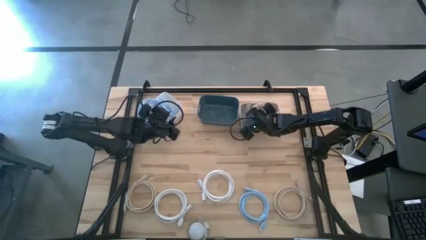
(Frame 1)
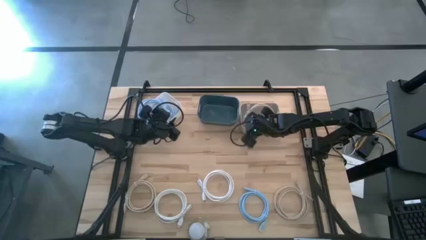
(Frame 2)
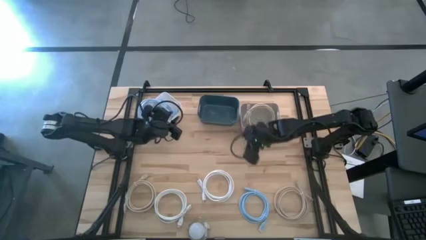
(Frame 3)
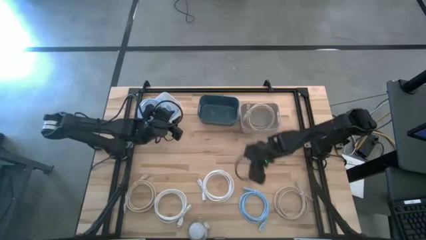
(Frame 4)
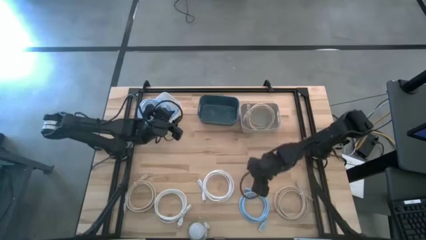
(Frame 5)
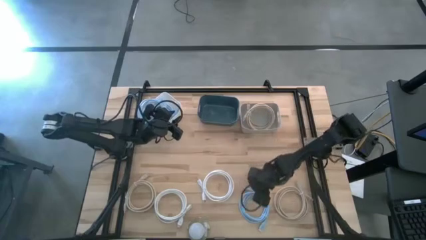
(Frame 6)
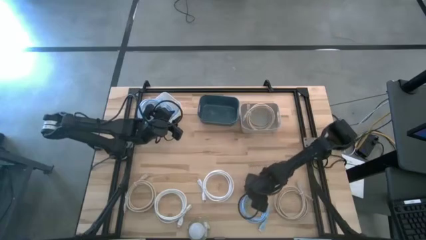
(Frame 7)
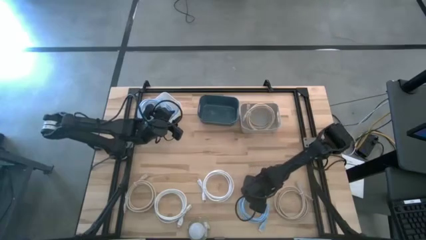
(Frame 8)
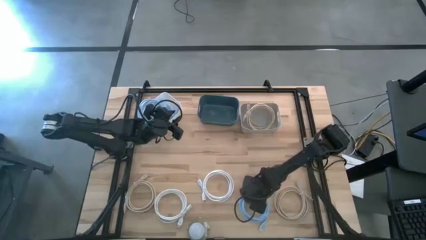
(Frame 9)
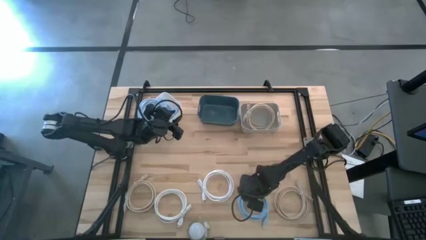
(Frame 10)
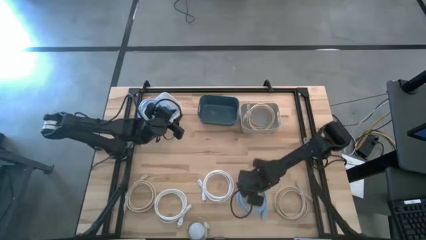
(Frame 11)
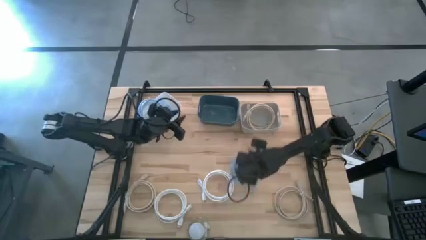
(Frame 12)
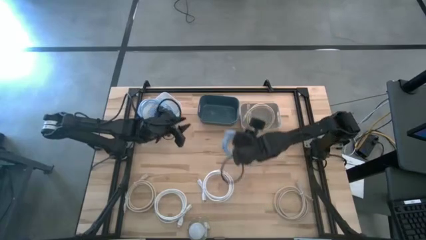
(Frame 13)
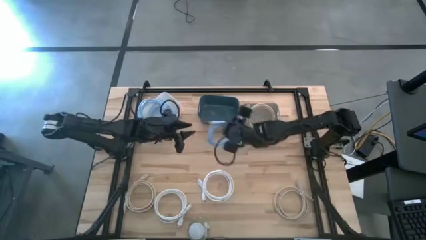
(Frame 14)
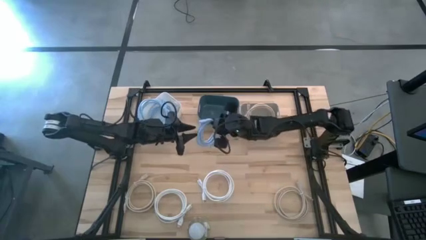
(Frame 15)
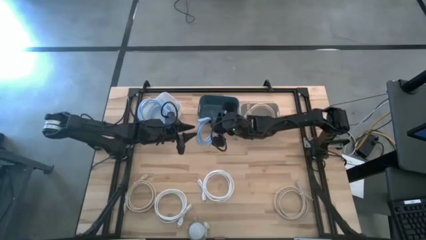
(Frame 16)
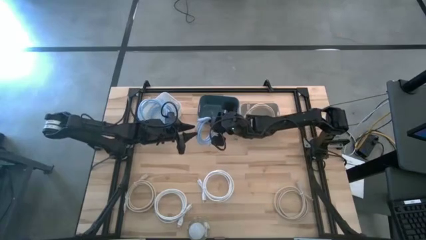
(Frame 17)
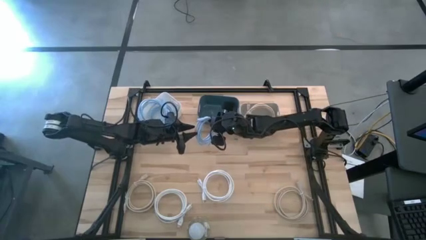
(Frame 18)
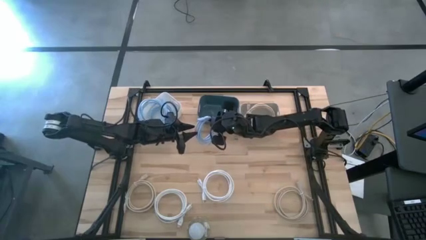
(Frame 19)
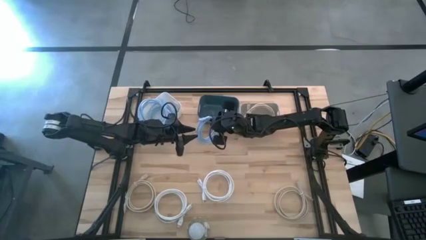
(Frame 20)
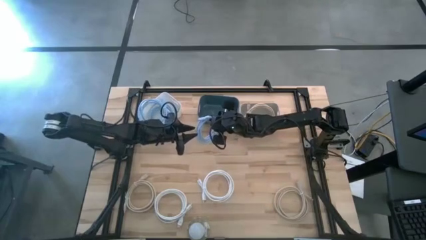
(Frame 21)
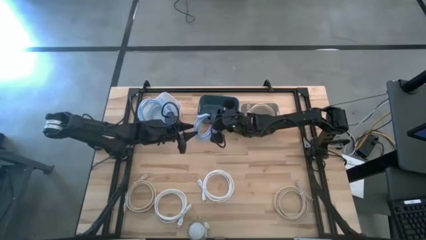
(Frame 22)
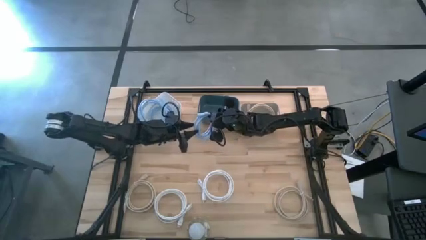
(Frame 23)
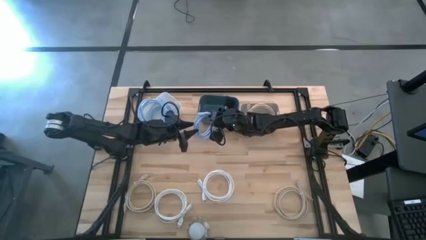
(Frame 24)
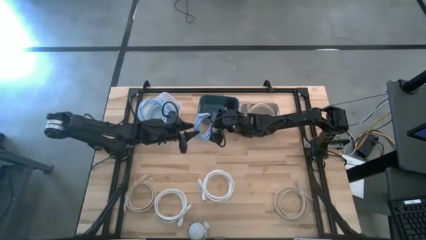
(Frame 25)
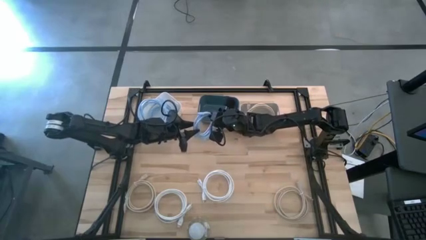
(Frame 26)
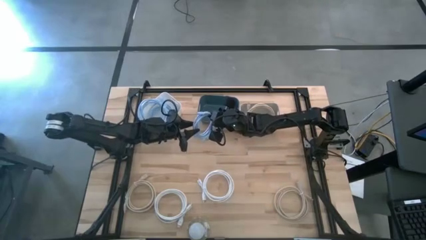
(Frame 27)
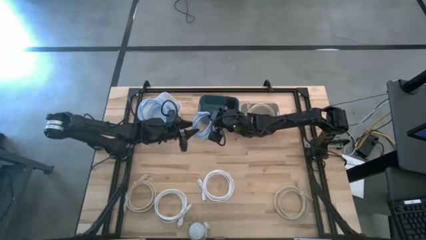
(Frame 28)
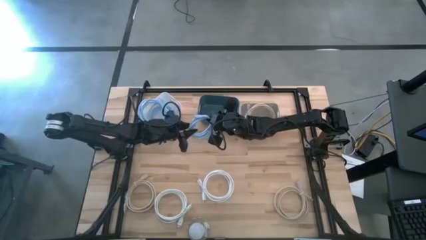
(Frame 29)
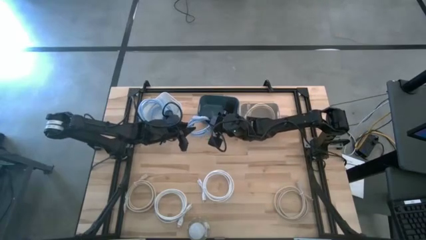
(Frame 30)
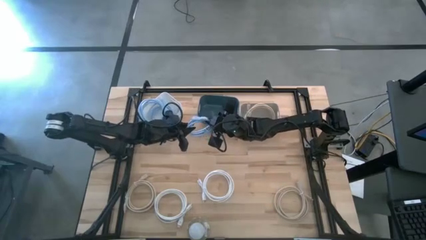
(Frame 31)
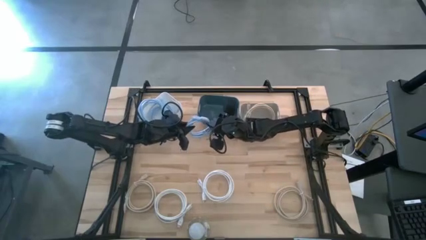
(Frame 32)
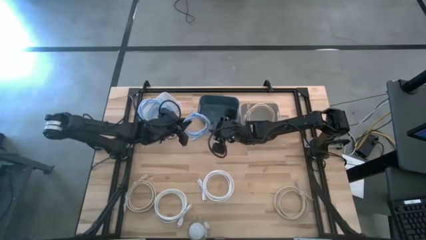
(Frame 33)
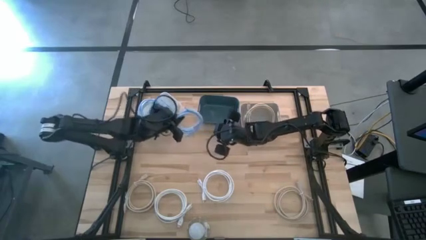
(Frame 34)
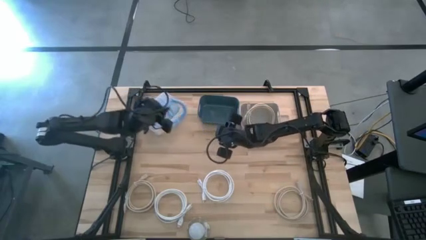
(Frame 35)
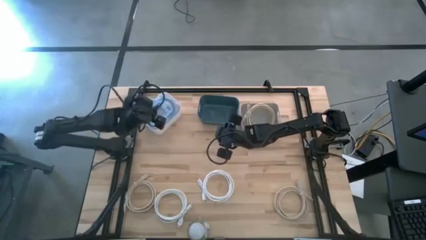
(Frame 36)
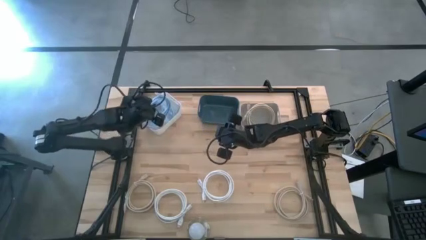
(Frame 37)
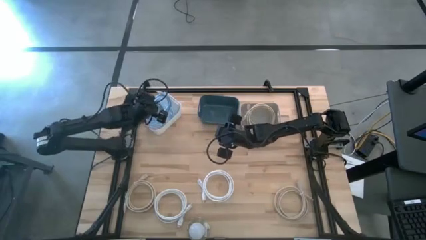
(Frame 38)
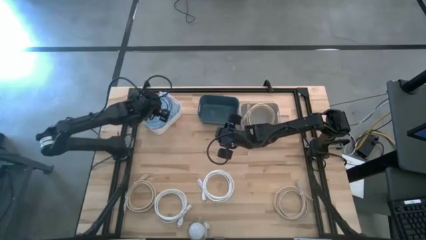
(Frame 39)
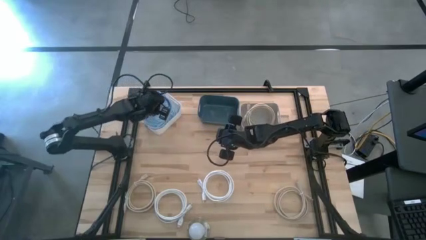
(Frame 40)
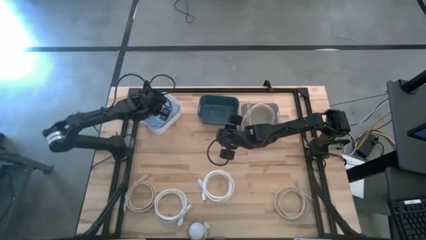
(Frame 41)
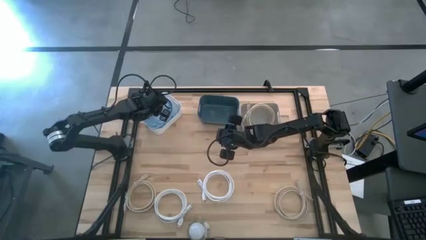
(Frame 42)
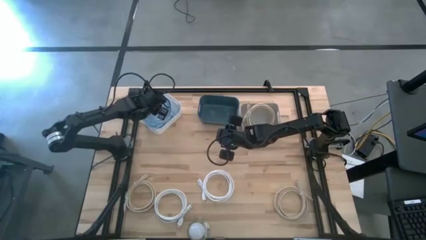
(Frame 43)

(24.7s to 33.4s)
Task: Pick & Place USB Port
Put the blue charger cable into the white bin

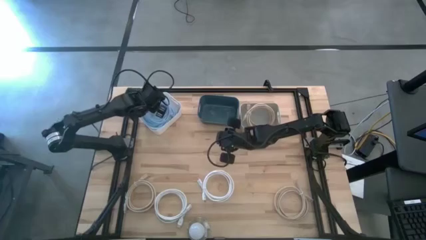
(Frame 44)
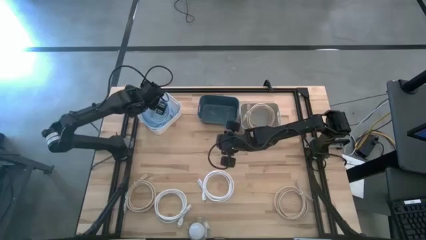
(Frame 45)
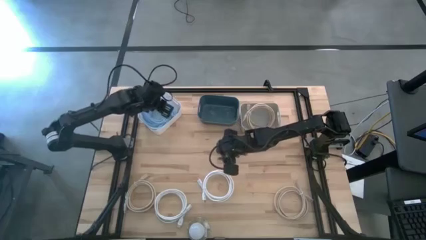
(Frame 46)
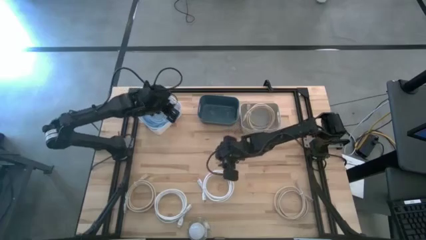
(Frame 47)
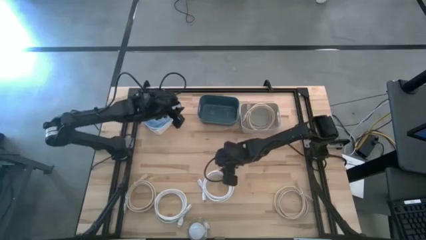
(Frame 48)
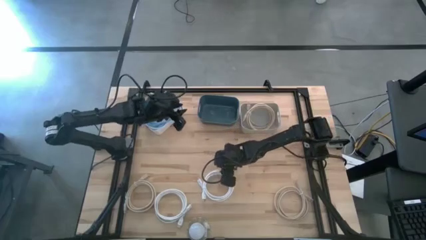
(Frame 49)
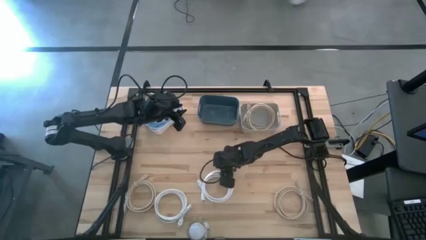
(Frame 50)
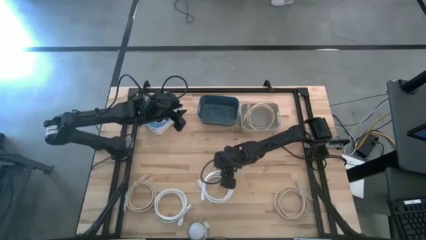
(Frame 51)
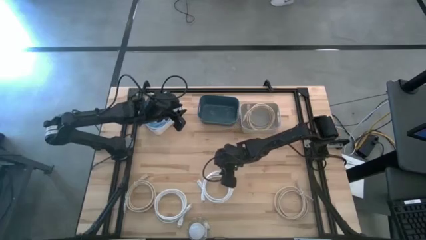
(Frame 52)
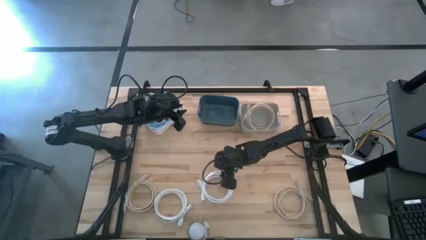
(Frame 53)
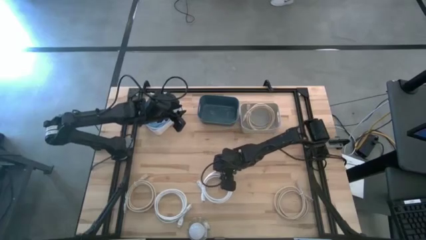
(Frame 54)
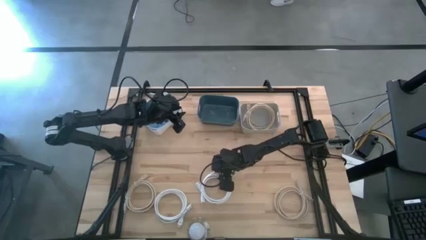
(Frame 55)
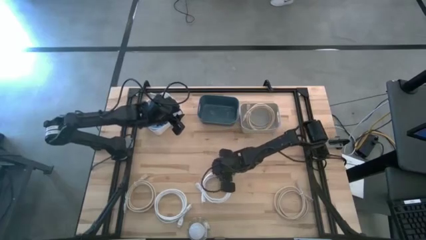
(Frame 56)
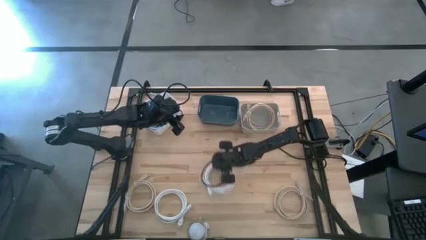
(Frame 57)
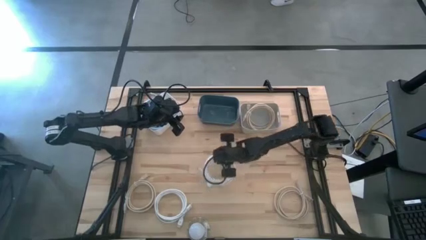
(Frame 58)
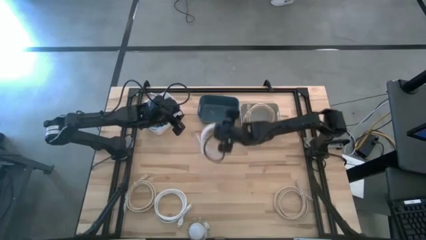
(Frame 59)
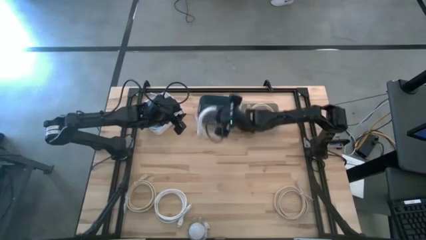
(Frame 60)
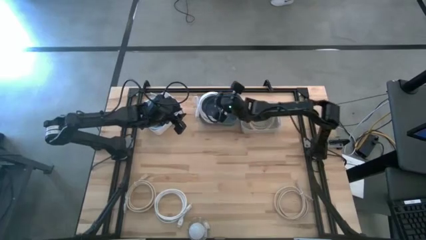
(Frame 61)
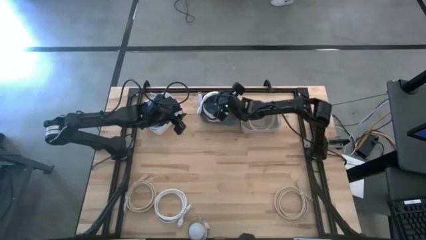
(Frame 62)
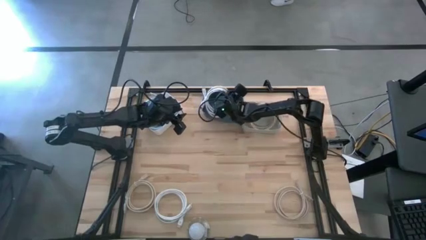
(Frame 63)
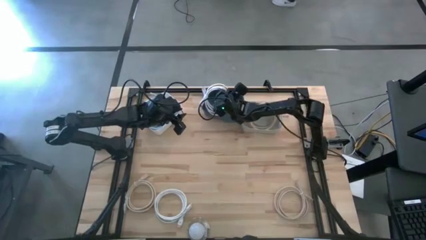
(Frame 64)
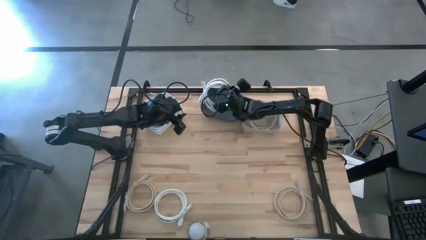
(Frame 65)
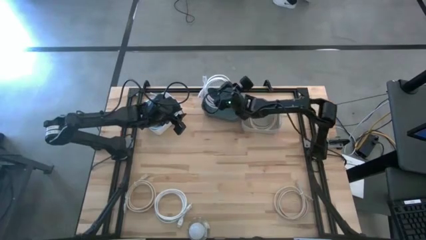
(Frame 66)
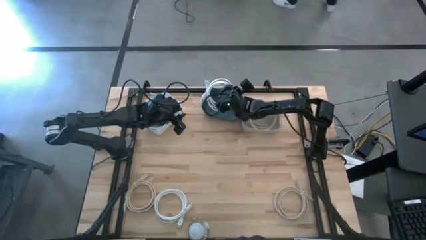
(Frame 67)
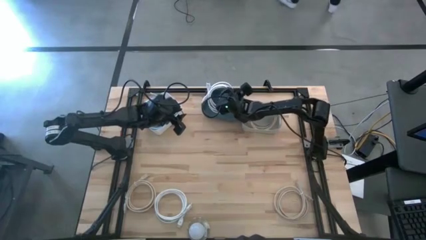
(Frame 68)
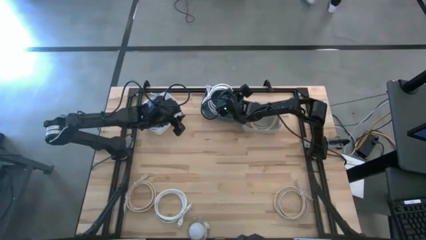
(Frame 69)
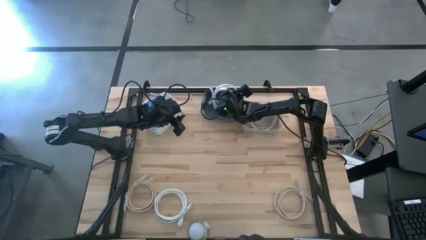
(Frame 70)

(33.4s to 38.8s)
Put the right white charger cable into the blue bin

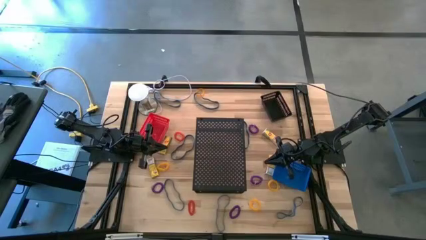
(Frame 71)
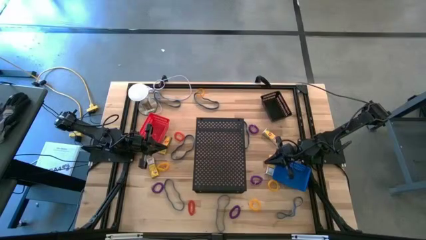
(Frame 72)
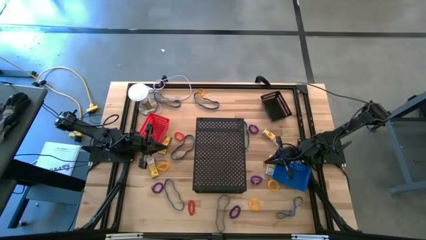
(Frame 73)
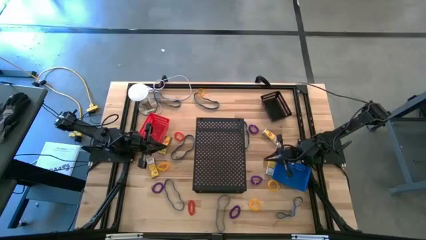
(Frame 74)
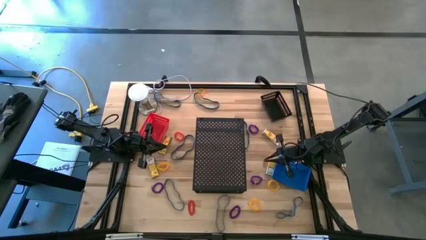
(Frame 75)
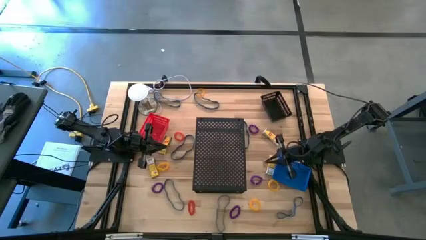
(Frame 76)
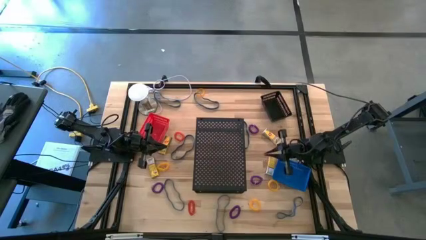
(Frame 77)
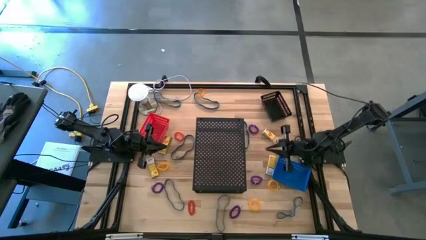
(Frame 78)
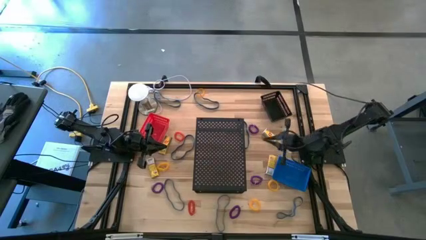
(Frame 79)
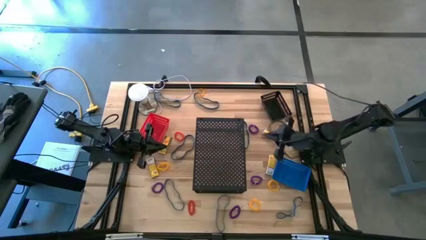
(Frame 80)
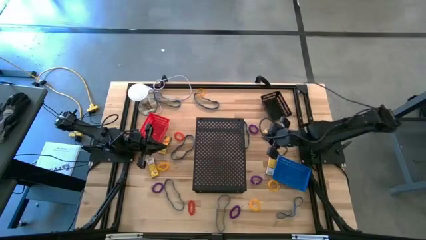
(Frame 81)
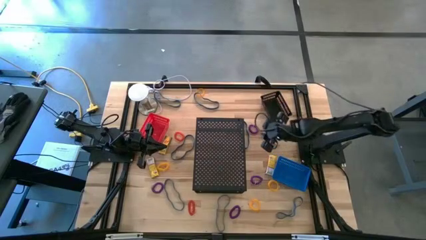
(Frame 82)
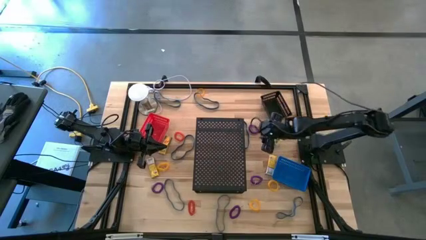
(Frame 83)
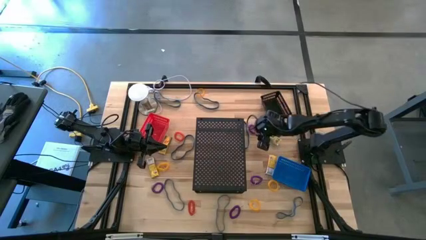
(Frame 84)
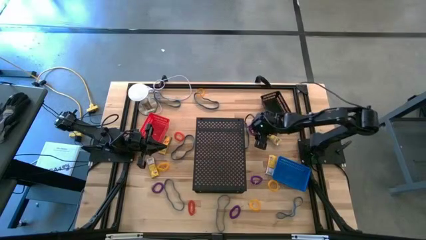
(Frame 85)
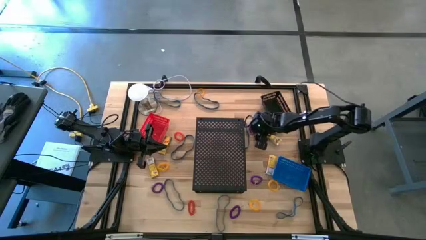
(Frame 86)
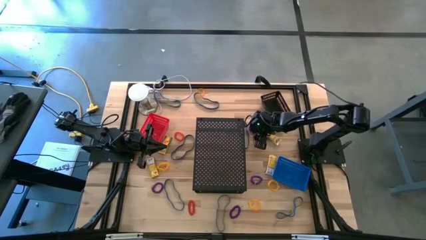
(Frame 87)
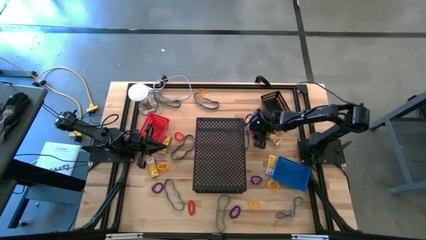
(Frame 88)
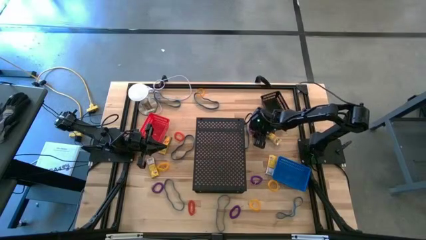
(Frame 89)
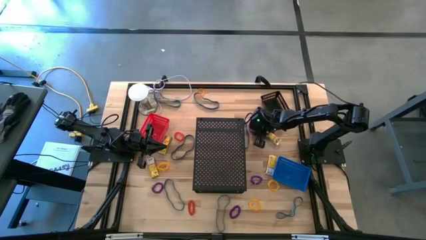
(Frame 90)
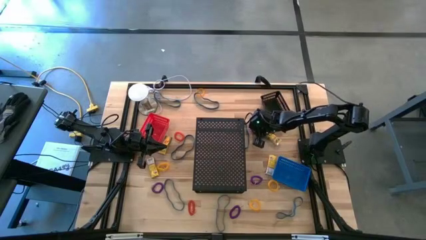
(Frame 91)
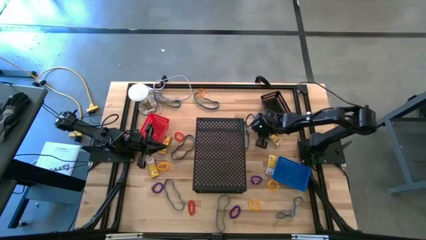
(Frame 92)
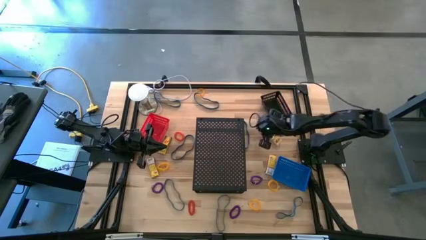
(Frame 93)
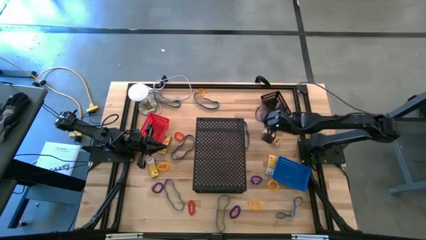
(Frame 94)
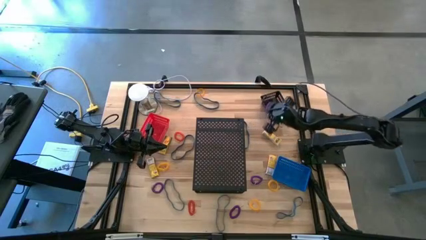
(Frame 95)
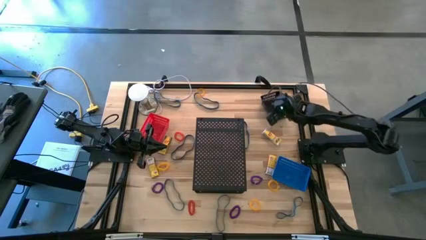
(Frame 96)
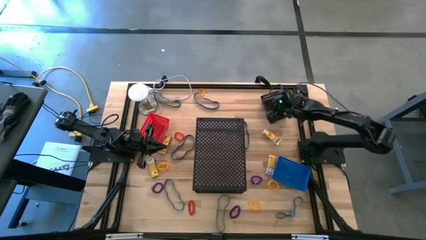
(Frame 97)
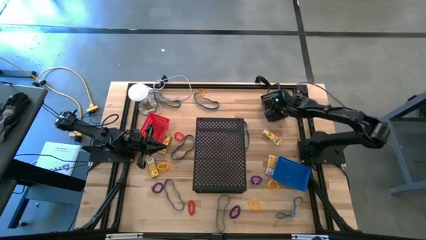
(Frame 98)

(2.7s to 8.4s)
Task: Pick & Place Office Desk Supplies
Put the violet spring keychain into the black bin
